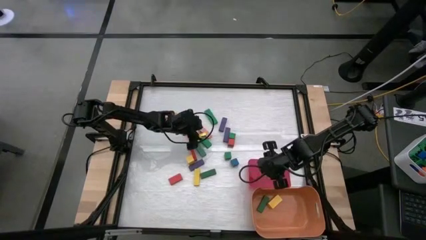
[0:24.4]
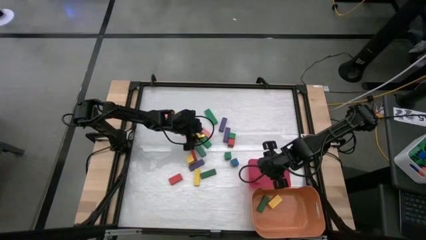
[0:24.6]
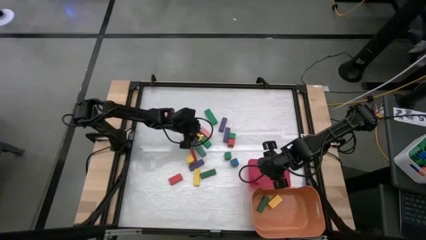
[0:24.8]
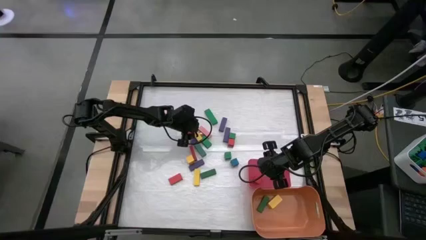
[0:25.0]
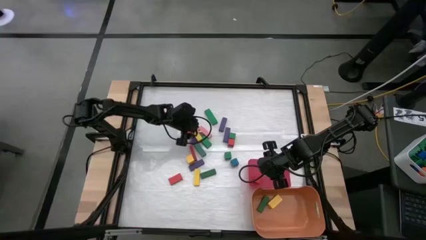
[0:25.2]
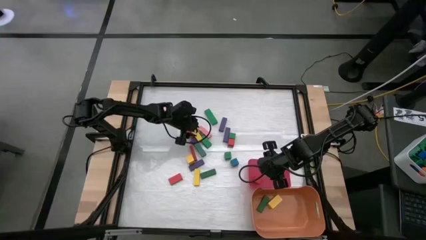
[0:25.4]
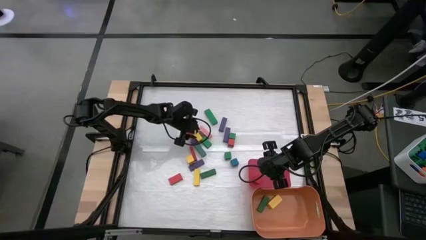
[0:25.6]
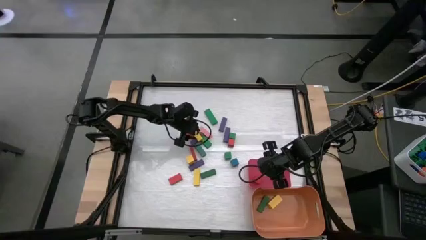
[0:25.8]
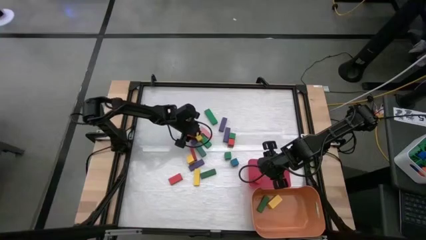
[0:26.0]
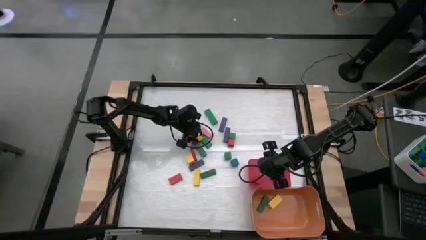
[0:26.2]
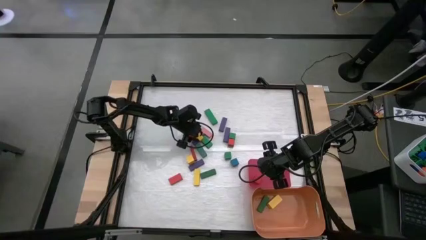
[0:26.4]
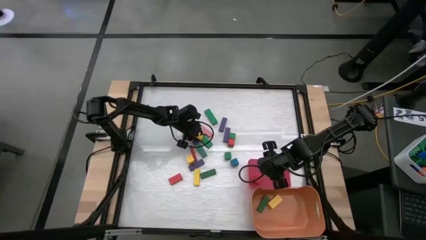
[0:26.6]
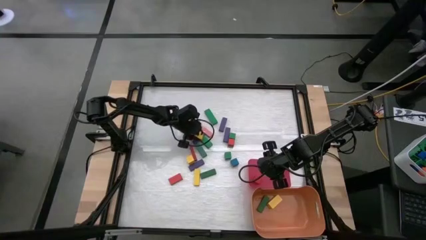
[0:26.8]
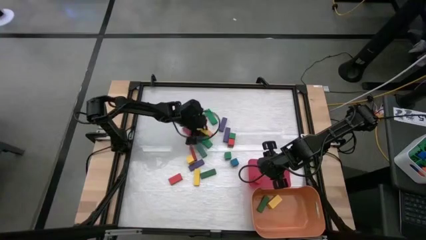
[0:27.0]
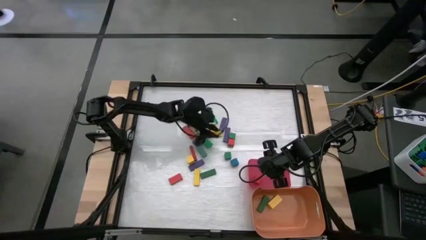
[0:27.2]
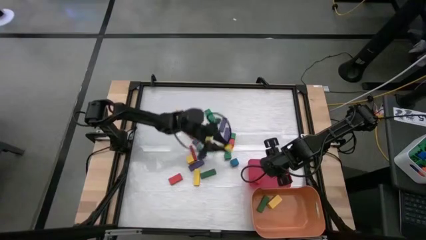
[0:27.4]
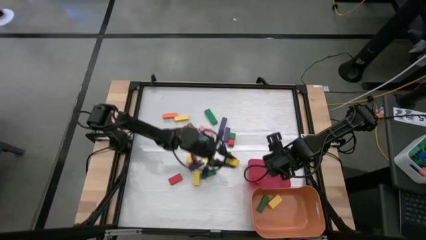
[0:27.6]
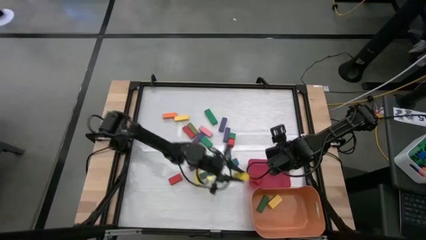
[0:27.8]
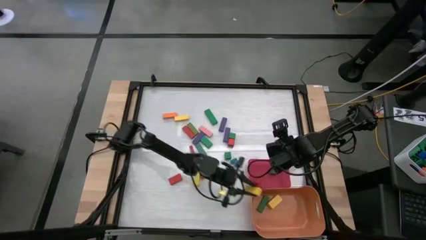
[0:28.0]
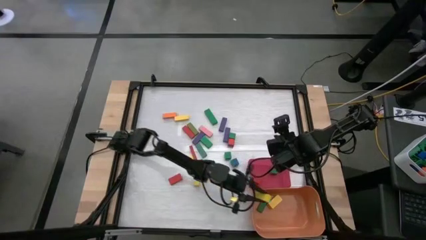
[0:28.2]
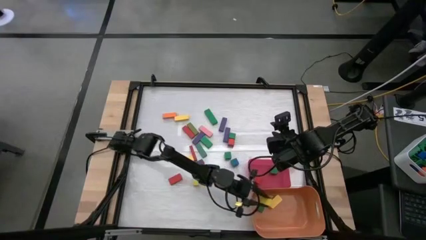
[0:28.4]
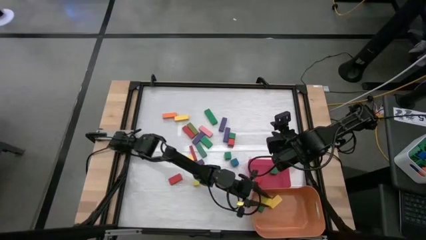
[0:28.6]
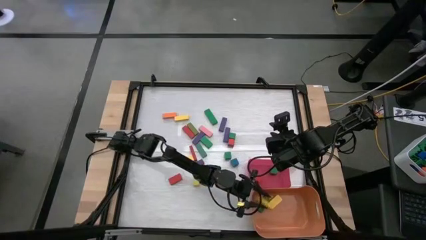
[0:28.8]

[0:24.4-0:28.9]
Task: Sort blocks by size
Put the yellow rectangle block into the orange bin

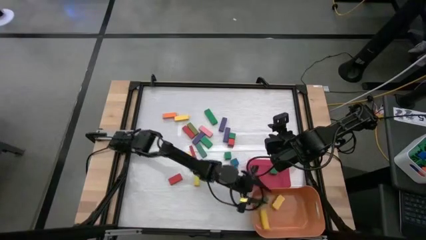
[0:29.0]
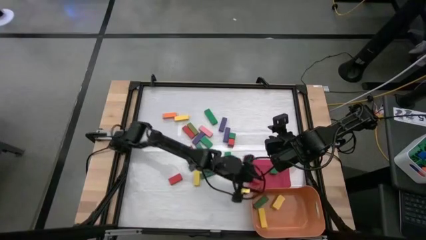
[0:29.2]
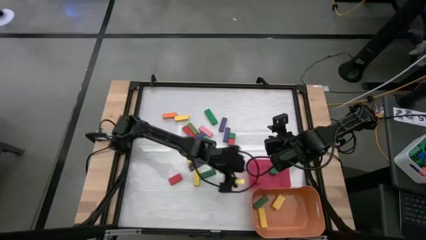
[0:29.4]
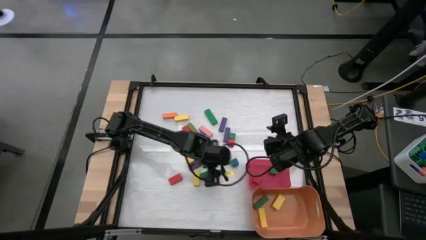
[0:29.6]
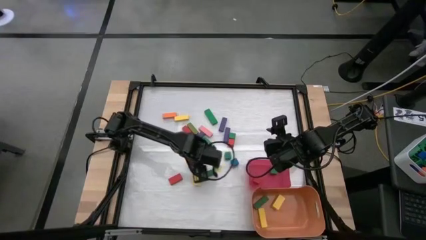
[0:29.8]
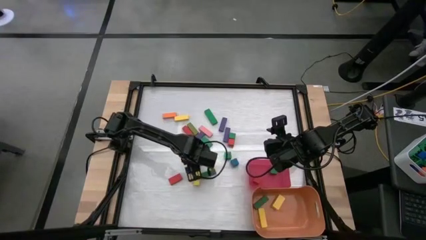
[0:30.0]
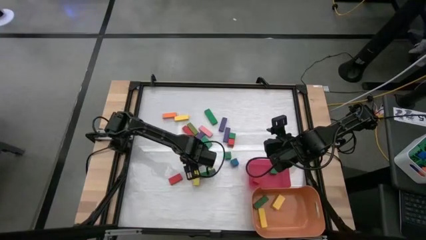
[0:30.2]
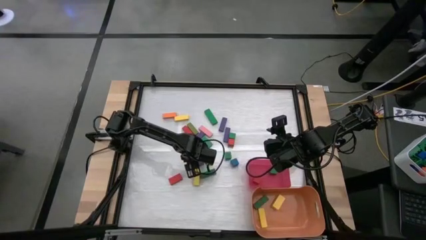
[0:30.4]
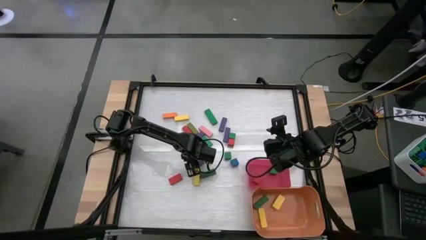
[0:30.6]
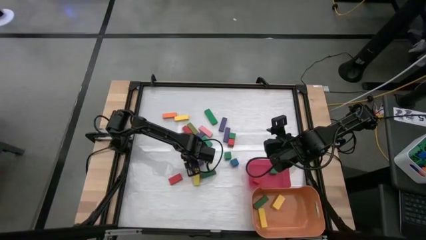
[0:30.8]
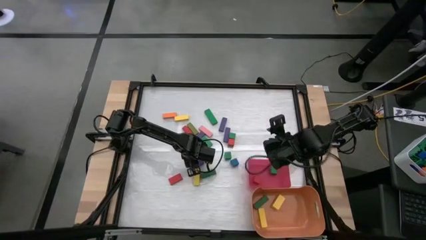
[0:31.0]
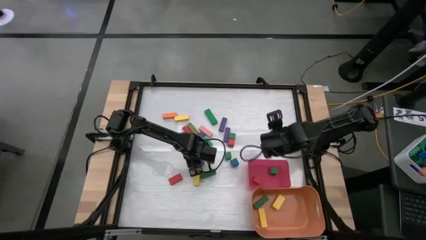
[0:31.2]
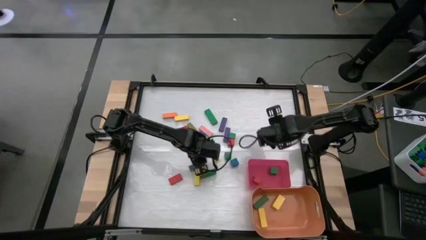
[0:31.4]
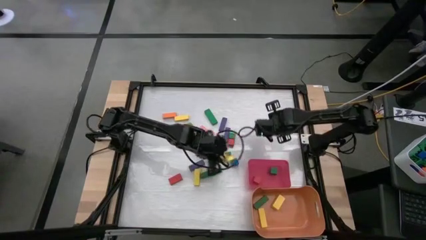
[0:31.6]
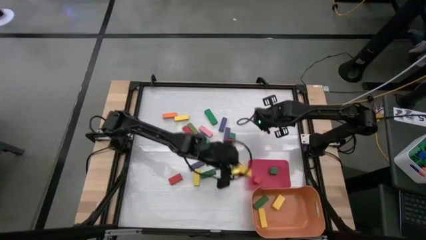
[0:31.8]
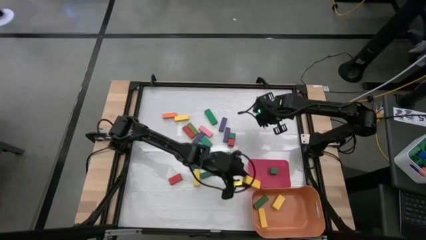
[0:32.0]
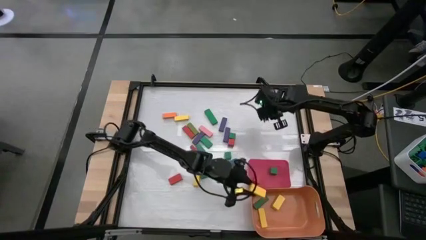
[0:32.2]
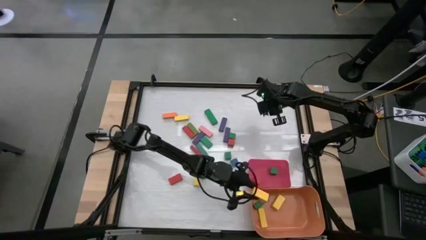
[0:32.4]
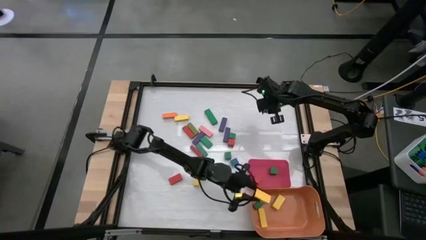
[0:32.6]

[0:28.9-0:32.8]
Put the yellow rectangle block into the orange bin

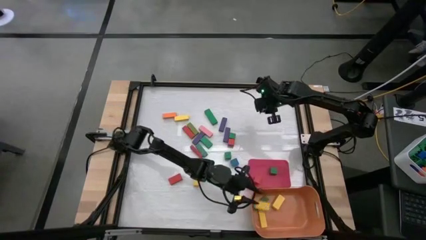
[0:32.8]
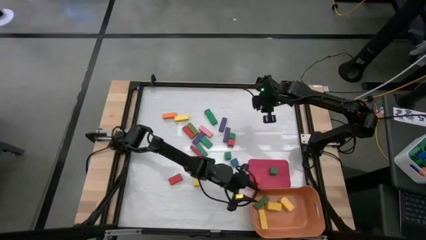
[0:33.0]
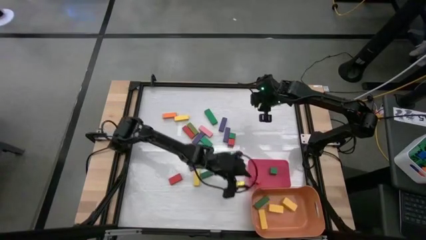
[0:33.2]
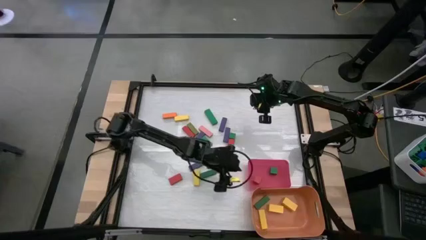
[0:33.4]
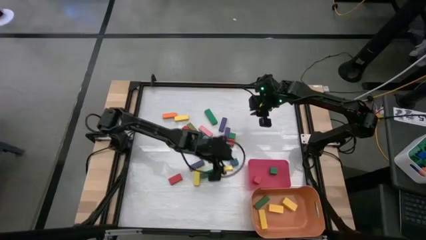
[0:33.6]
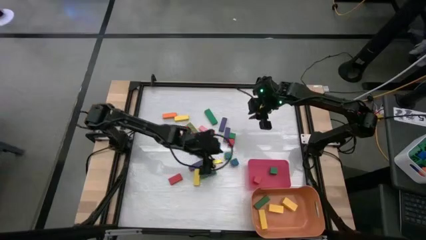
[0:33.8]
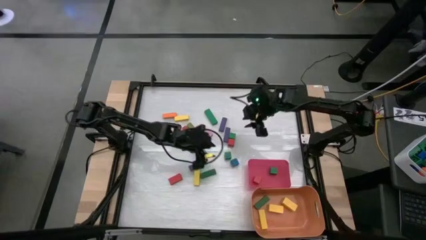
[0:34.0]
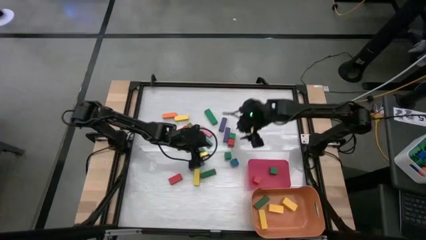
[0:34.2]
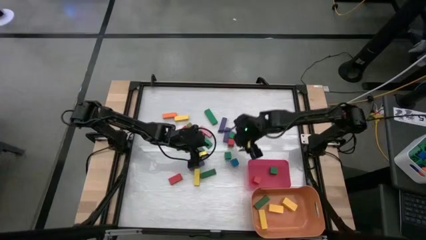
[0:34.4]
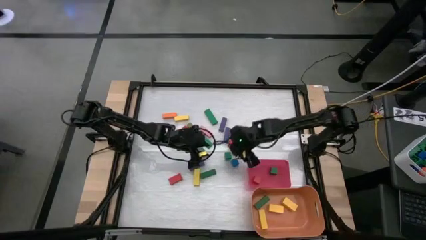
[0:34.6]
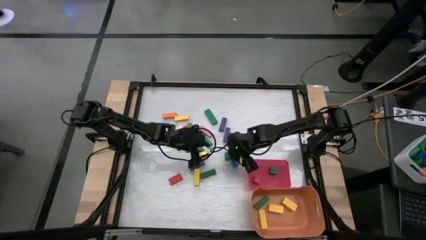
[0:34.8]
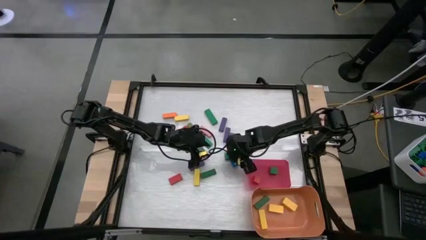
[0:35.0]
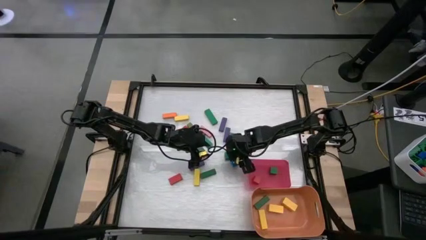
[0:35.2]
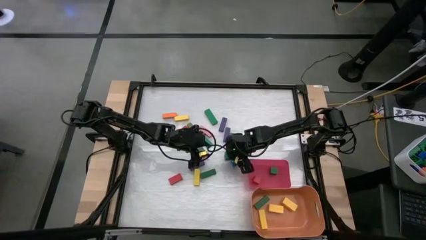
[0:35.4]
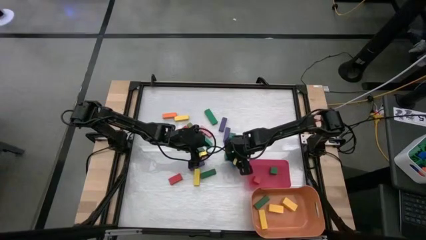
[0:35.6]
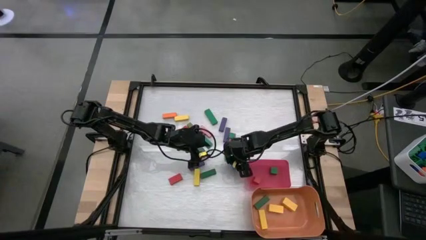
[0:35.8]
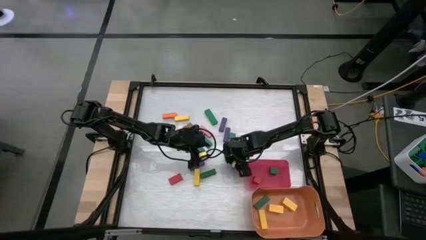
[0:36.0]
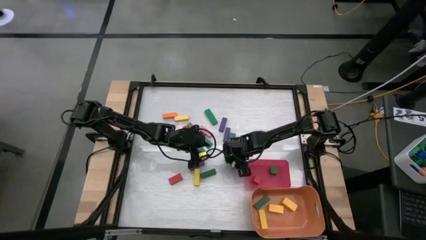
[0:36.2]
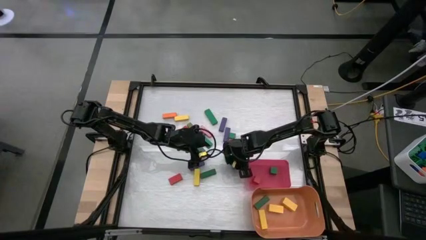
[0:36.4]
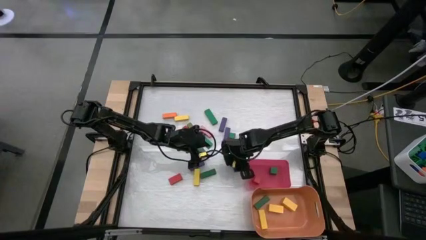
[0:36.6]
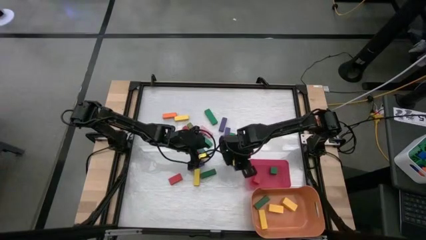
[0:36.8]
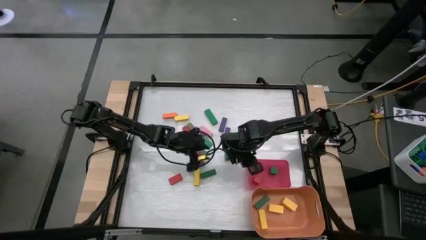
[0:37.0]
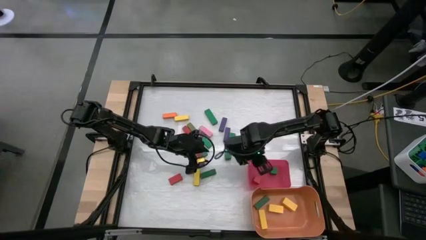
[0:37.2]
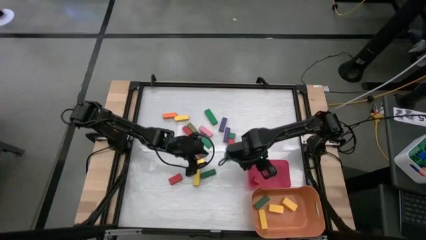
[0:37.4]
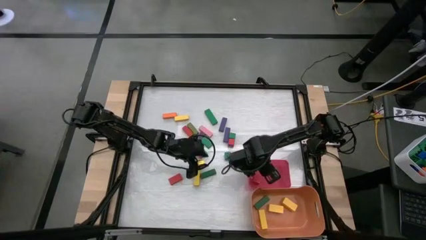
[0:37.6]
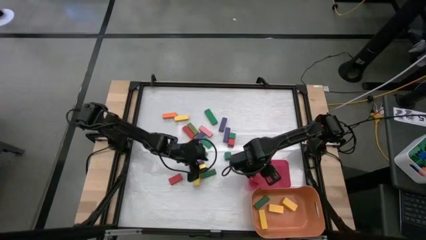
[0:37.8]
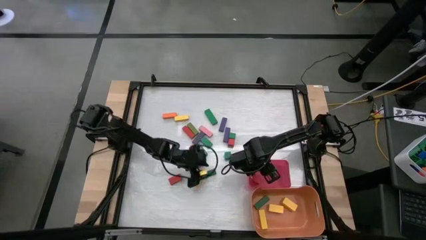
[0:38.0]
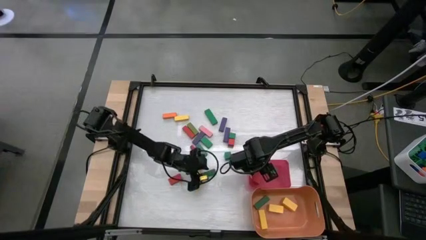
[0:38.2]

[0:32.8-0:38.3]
Put the blue square block into the pink bin

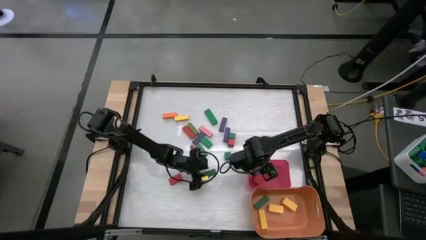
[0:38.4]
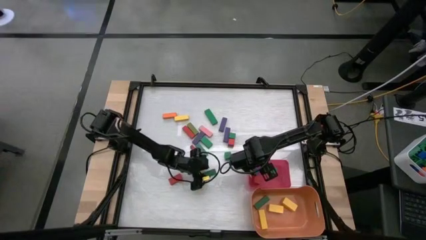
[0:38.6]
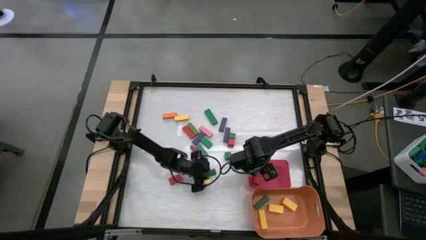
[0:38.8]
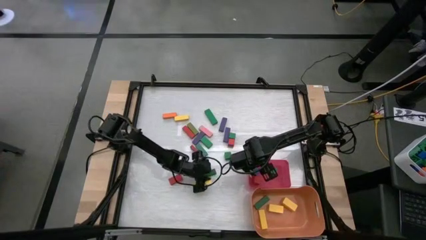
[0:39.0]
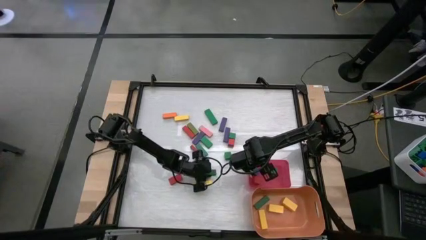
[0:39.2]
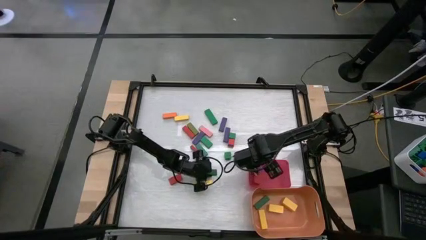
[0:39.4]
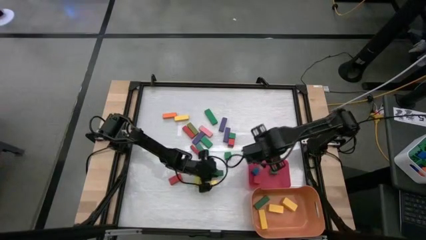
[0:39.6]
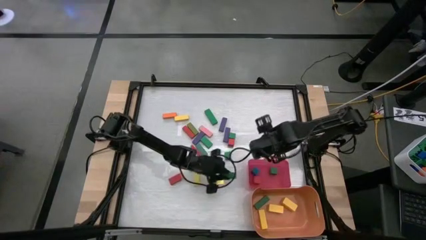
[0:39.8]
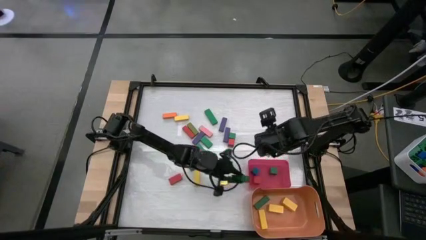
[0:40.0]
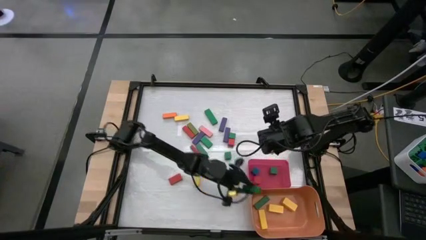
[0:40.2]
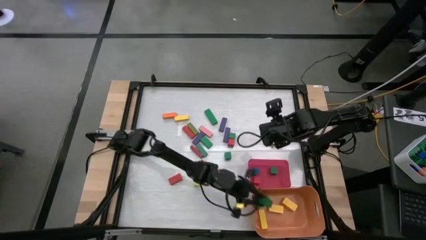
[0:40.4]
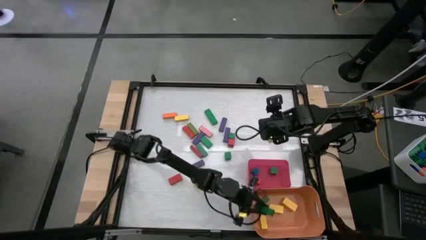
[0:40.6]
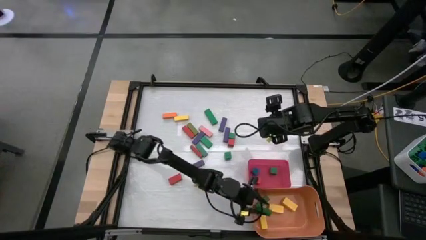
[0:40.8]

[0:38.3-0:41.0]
Put the green rectangle block into the orange bin

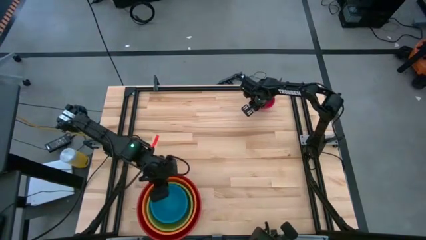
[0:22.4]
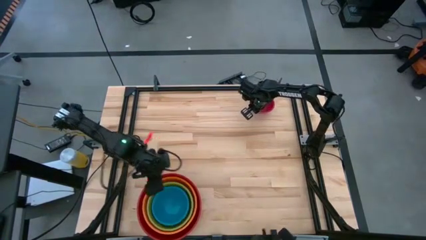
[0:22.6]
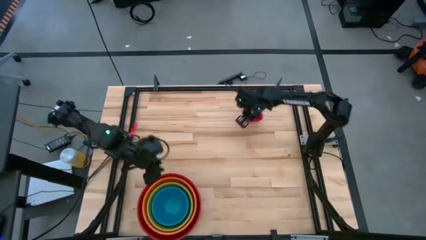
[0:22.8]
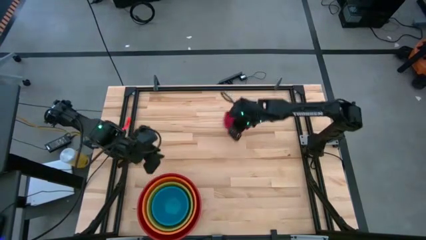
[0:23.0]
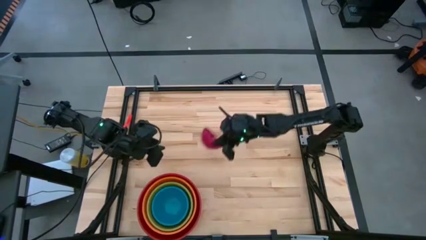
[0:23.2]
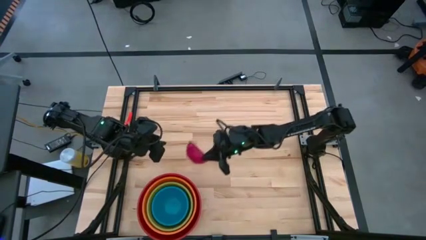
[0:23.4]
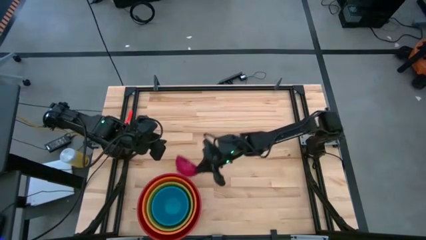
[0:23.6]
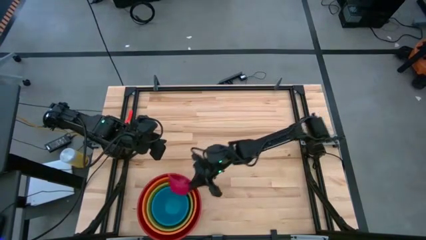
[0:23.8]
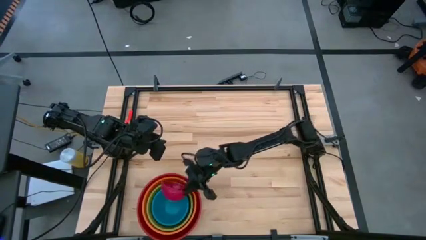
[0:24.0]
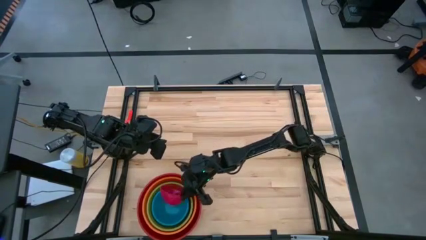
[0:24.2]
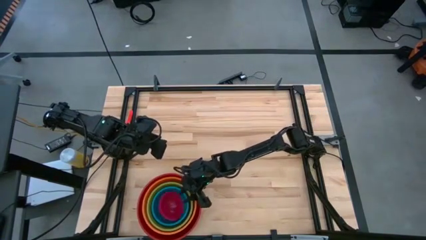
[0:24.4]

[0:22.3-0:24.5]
Task: Nest bowls inside each other by size order
Stack the pink bowl on top of the blue bowl
